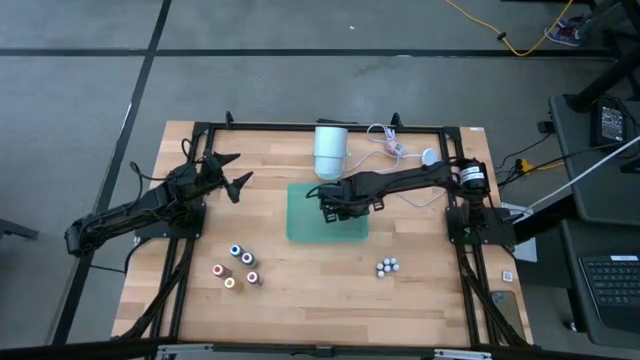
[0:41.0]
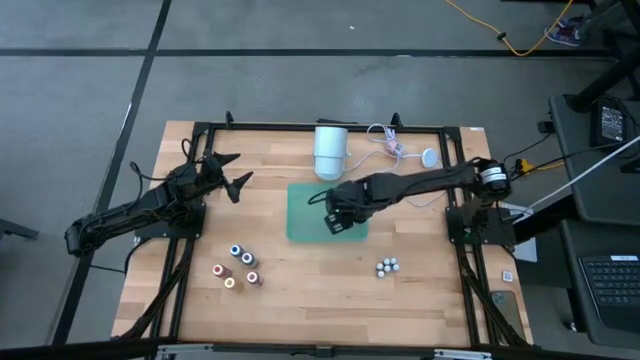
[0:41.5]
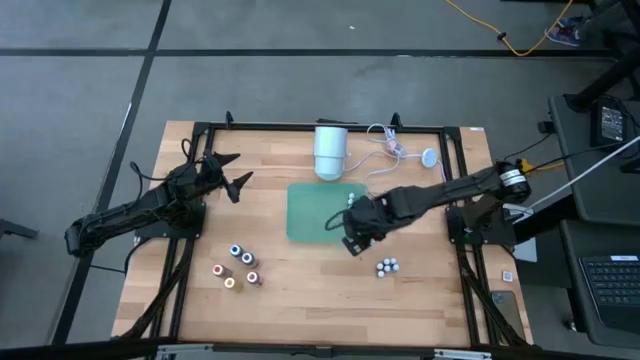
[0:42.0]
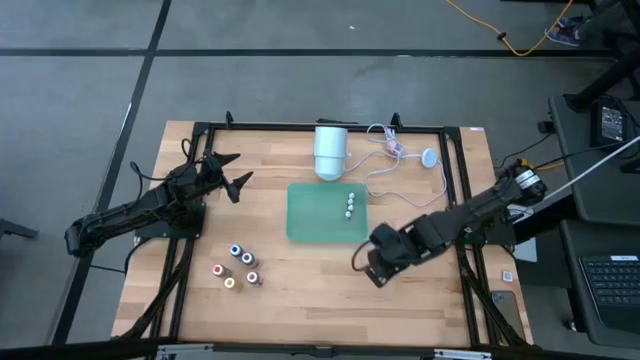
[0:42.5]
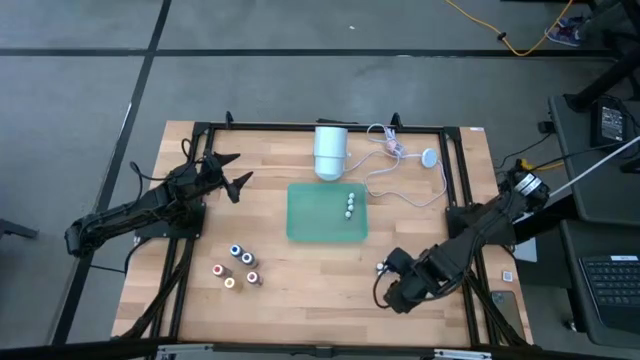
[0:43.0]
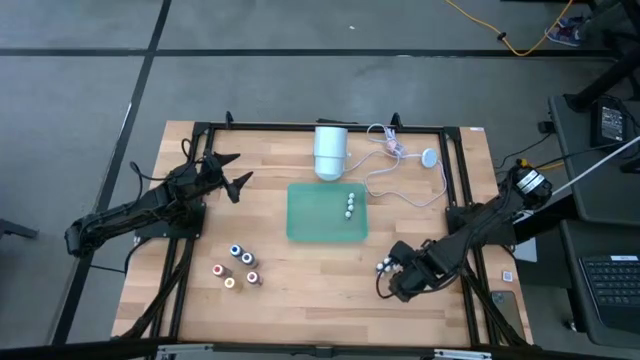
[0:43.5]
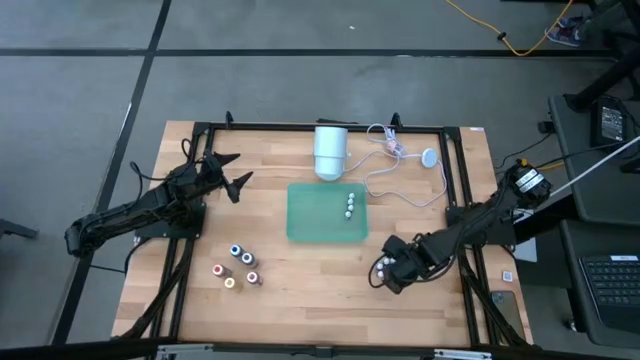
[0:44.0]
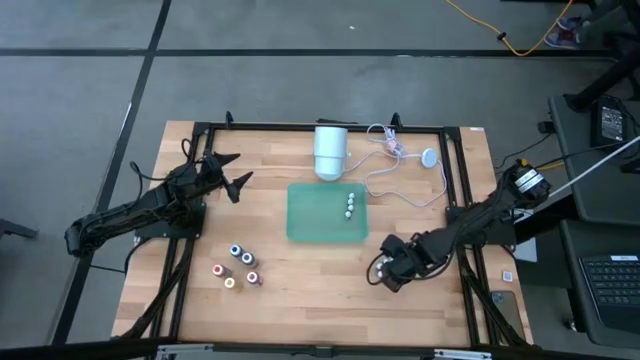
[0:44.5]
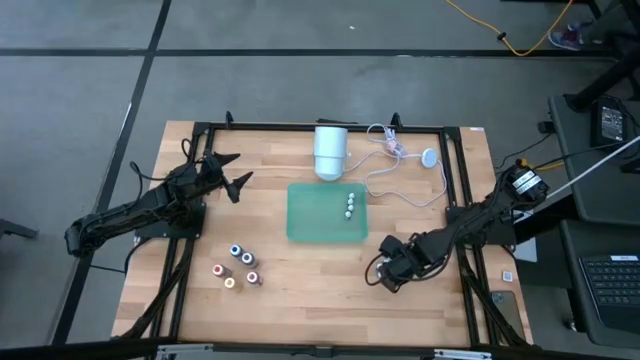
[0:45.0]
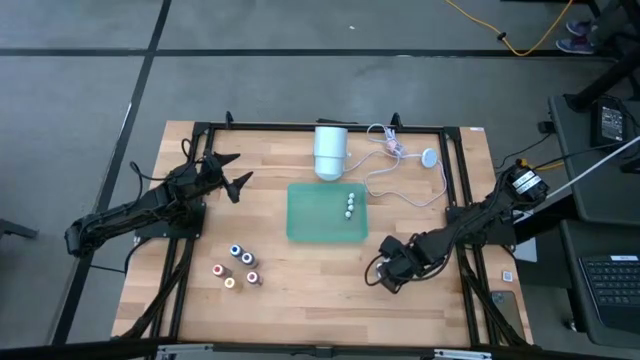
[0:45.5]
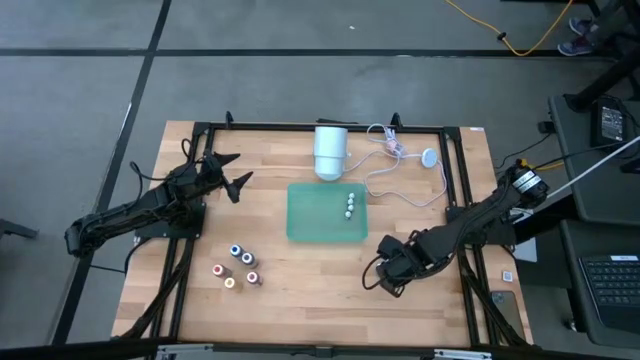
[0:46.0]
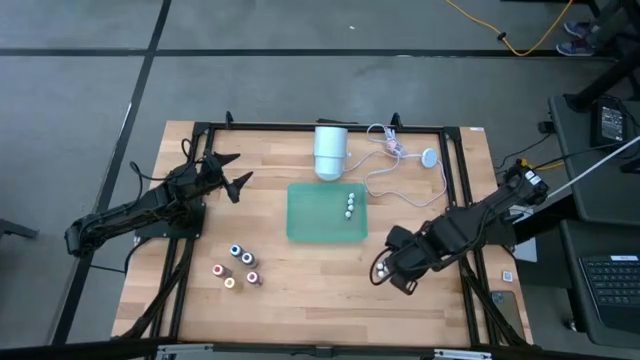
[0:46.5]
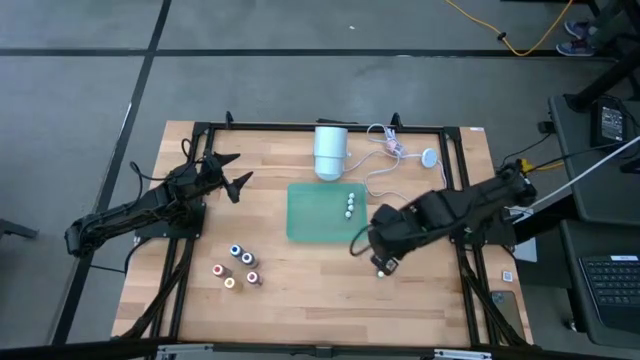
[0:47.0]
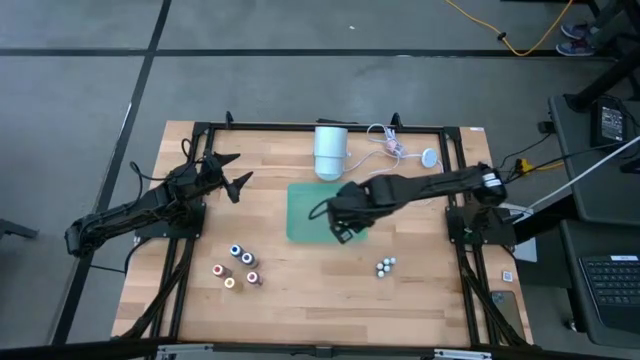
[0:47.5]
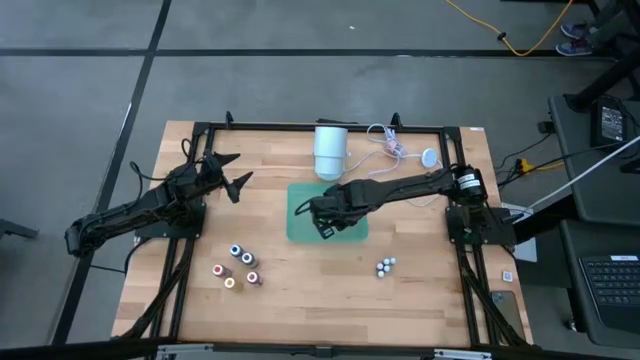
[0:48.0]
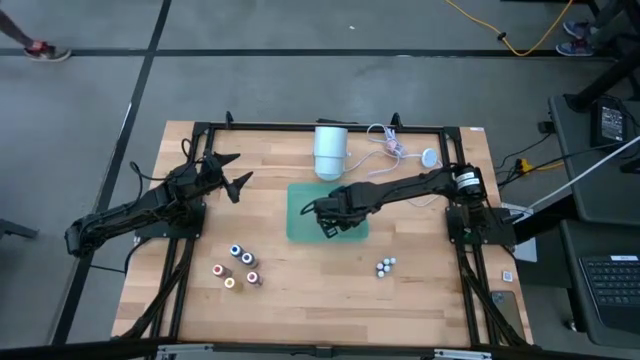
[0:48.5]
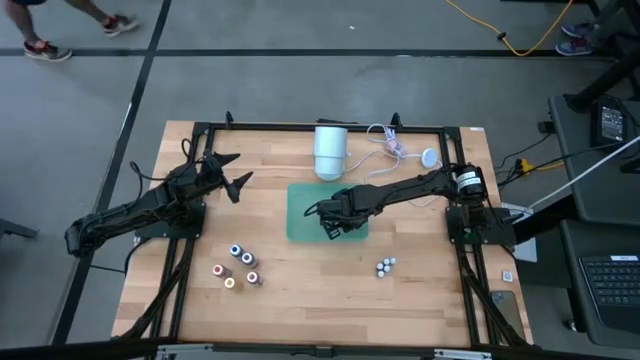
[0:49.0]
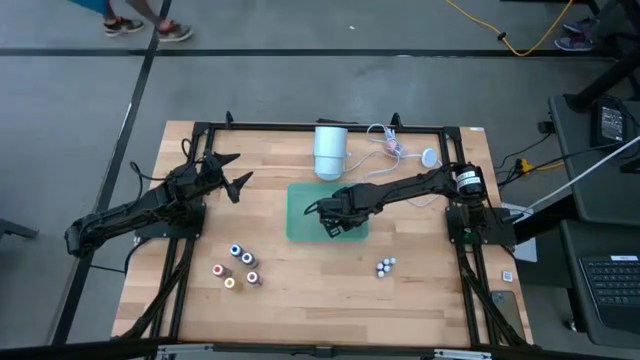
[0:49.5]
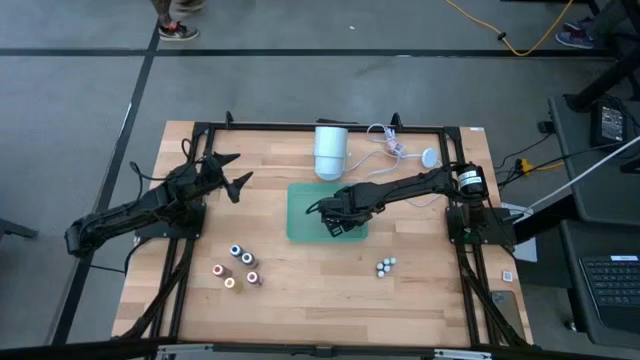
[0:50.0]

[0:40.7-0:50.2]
Task: Pick & Place food coloring
Put the bottom small blue food coloring bottle into the green bin

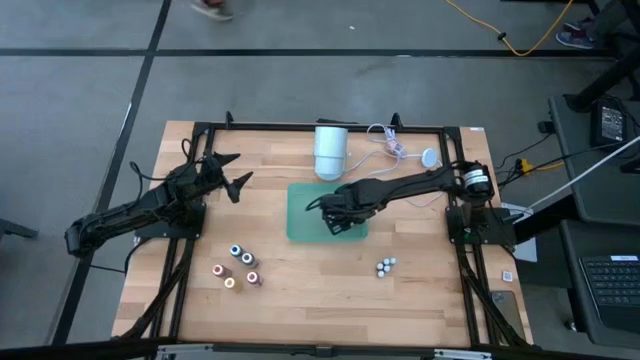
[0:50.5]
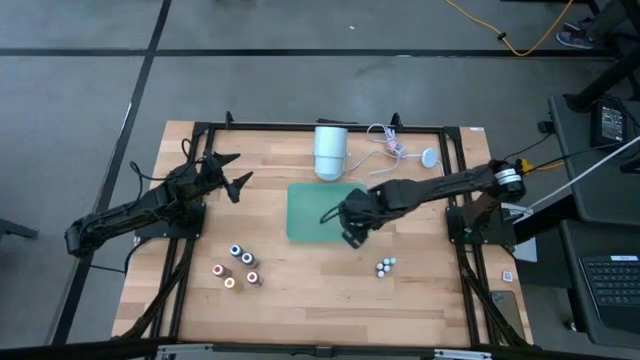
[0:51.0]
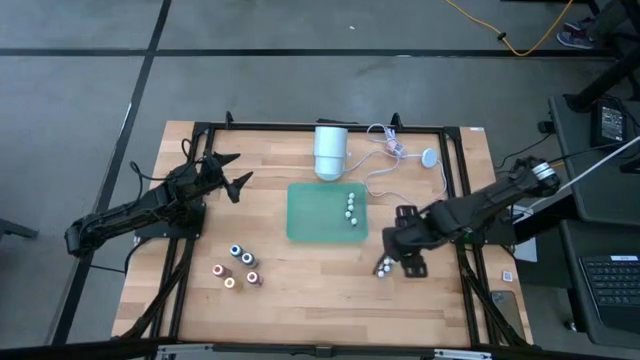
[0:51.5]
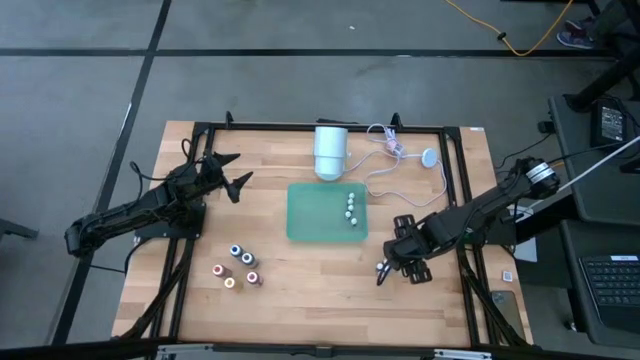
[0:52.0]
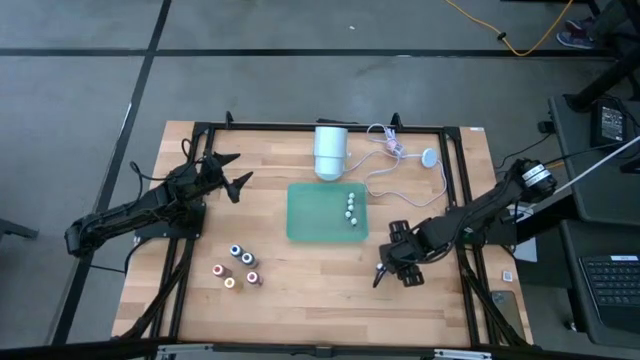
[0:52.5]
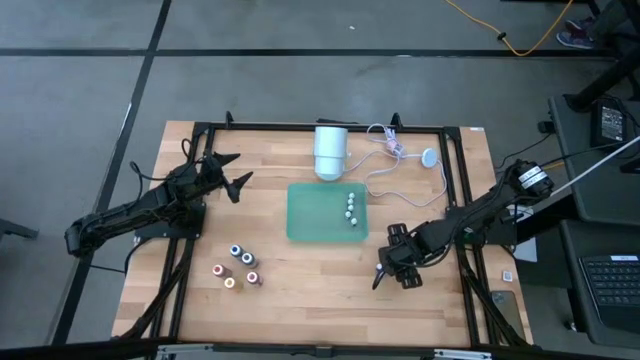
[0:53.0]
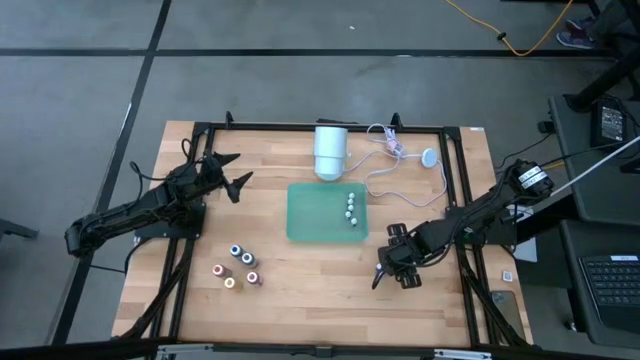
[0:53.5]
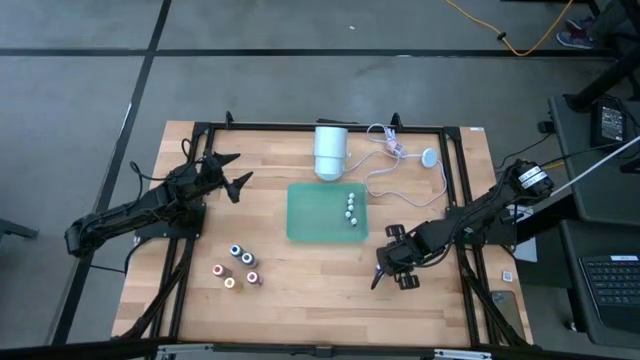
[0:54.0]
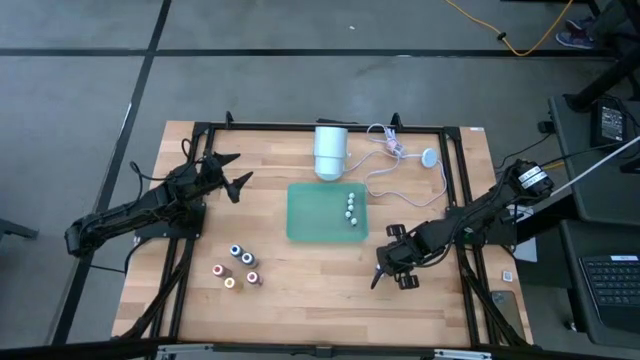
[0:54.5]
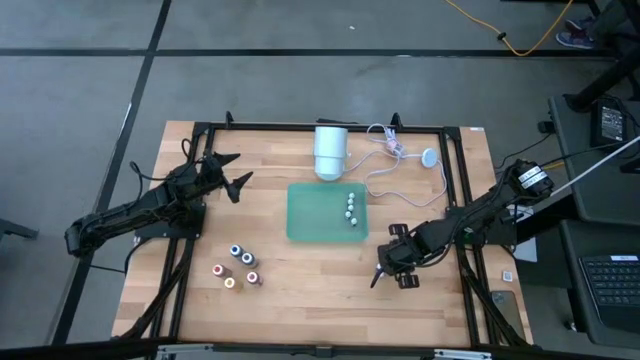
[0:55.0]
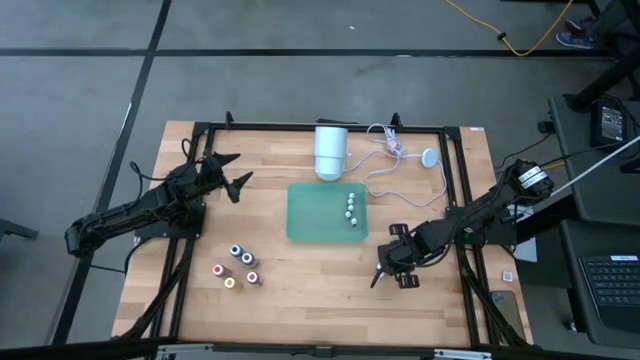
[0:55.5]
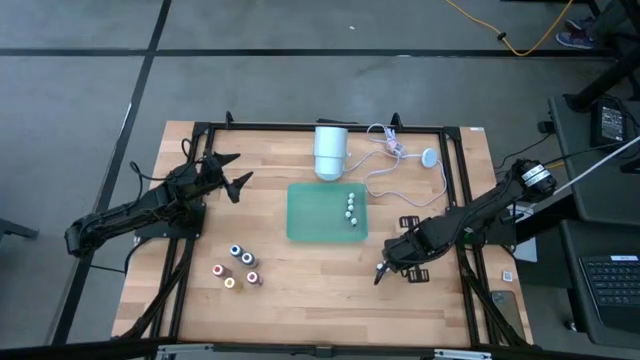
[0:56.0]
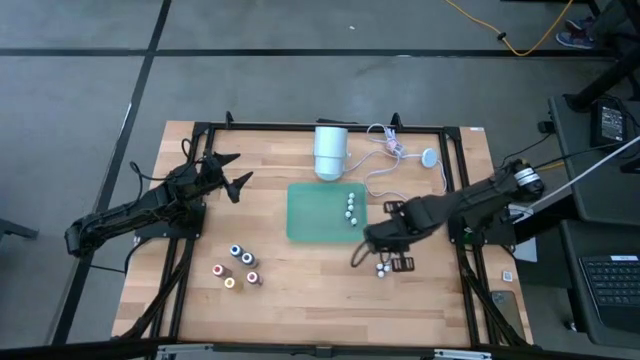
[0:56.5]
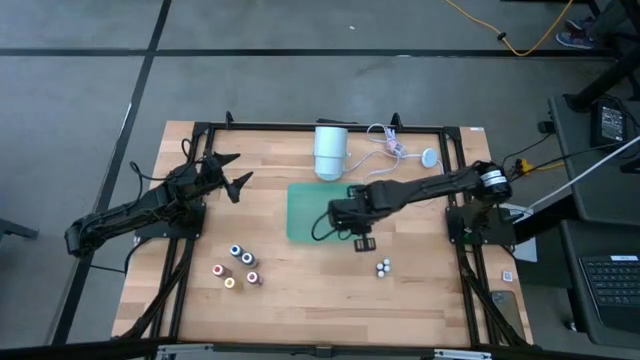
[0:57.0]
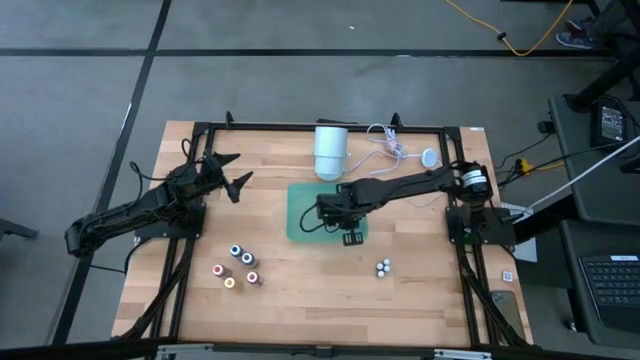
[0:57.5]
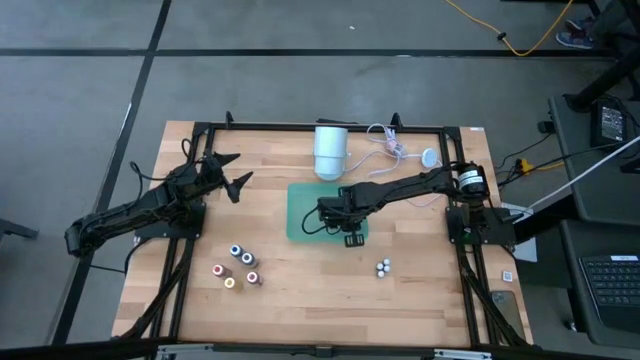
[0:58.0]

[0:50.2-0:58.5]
Put the small blue food coloring bottle into the green bin

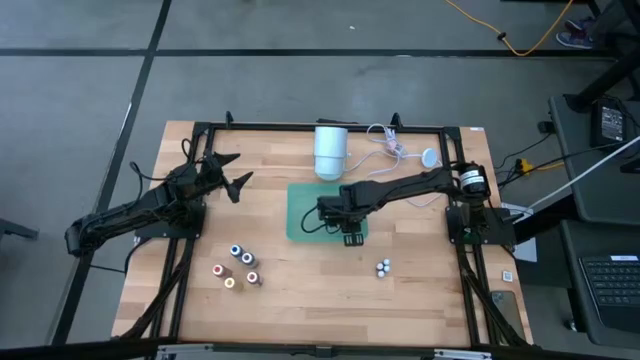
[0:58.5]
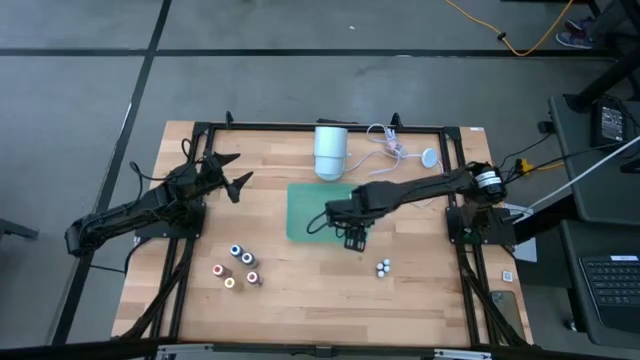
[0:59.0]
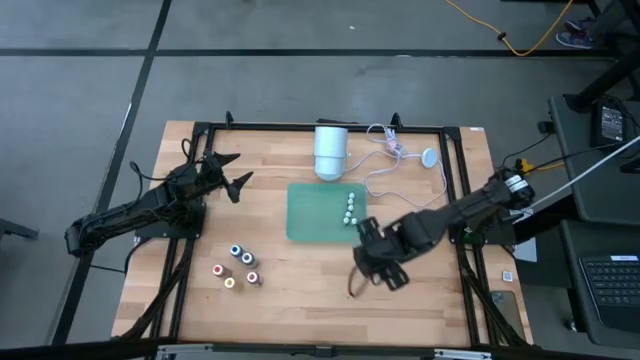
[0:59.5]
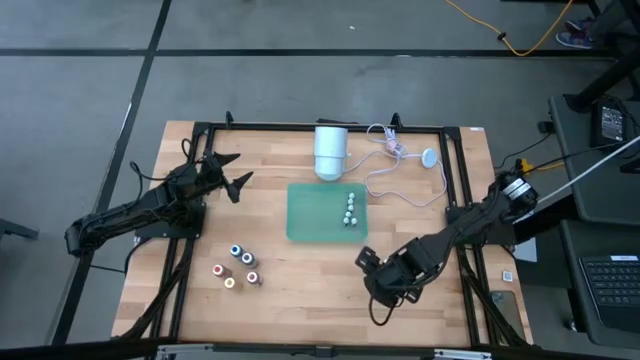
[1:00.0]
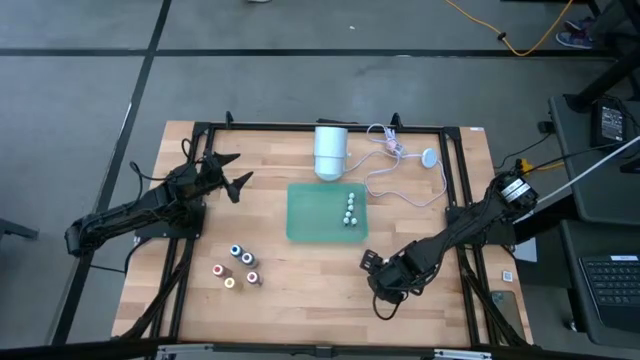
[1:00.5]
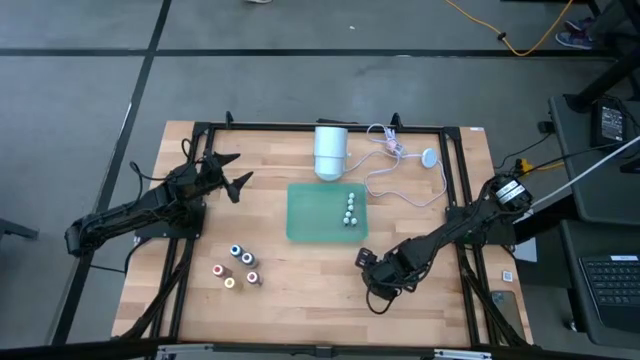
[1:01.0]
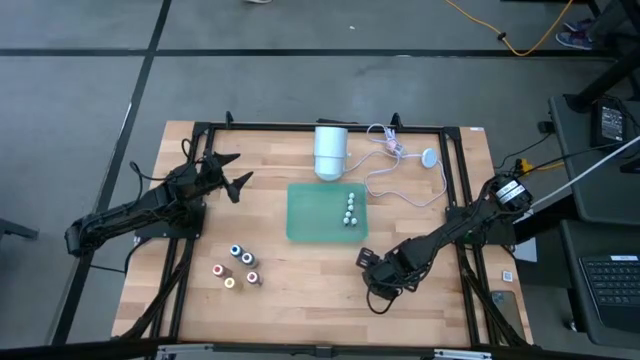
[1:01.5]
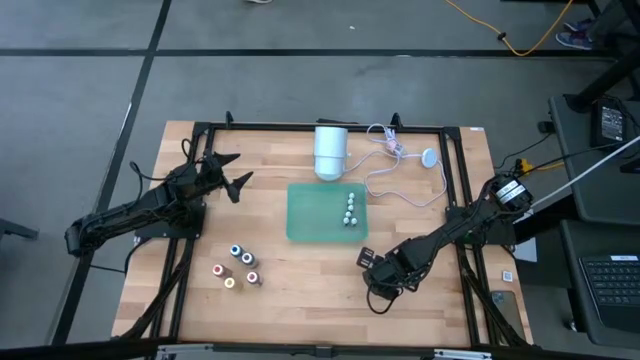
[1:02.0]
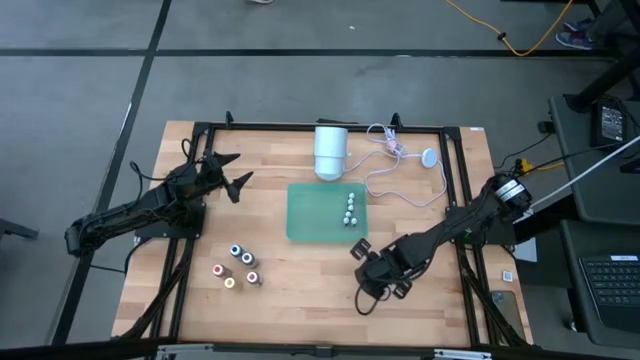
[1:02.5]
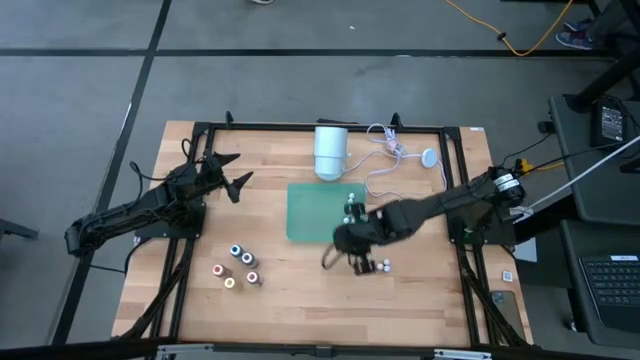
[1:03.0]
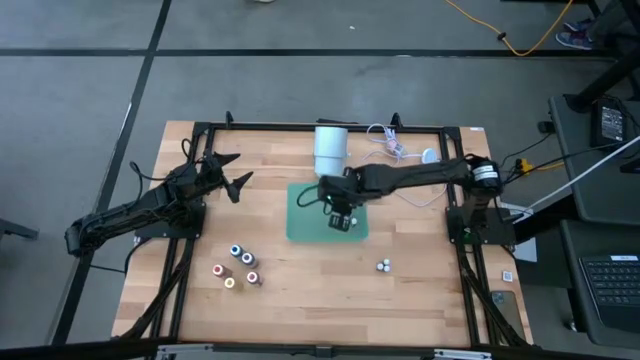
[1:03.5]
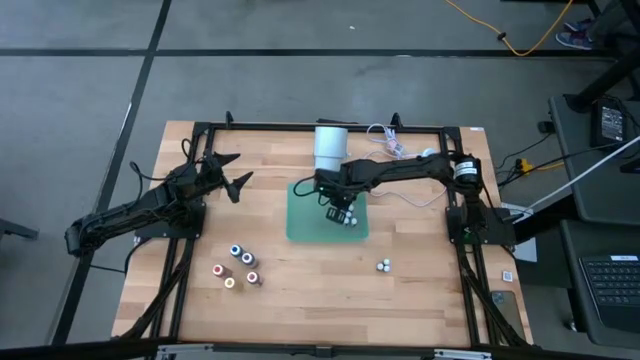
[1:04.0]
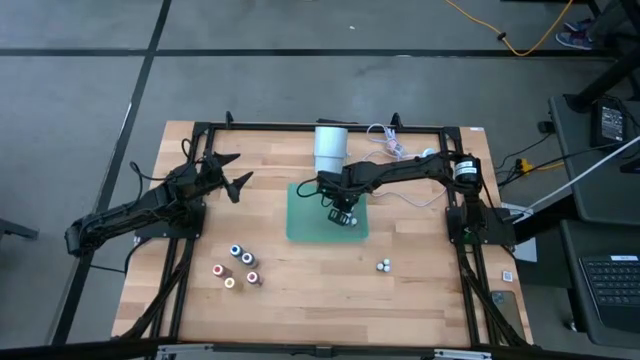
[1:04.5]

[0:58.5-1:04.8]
Put the small green food coloring bottle into the green bin
